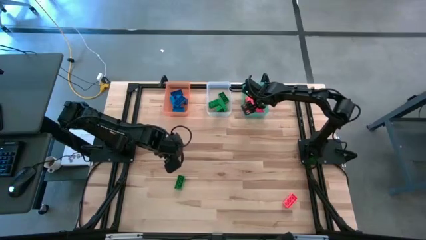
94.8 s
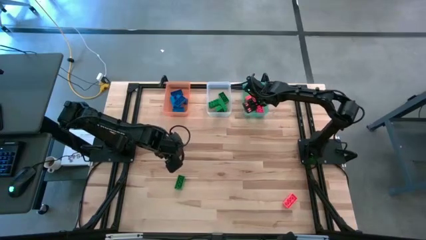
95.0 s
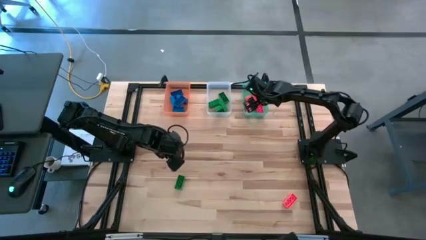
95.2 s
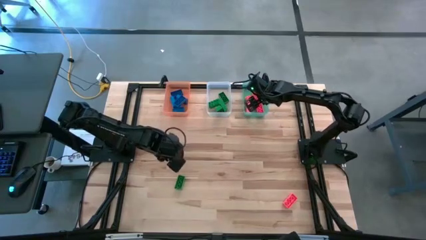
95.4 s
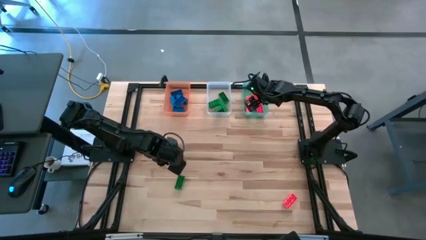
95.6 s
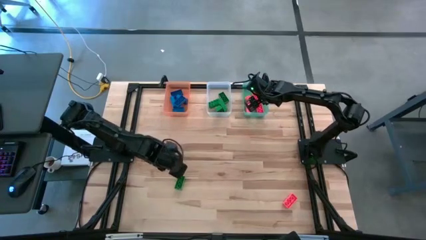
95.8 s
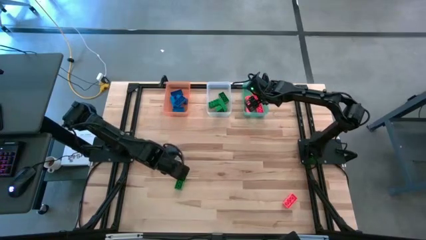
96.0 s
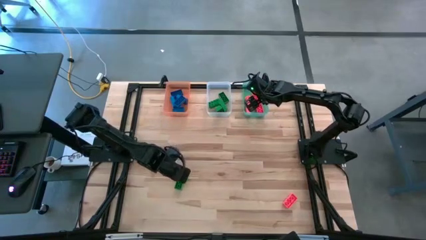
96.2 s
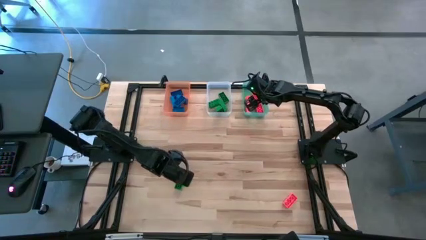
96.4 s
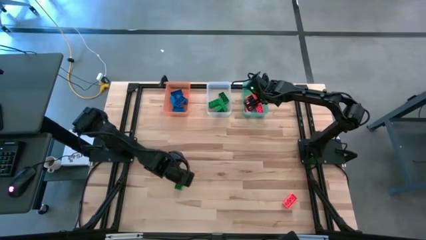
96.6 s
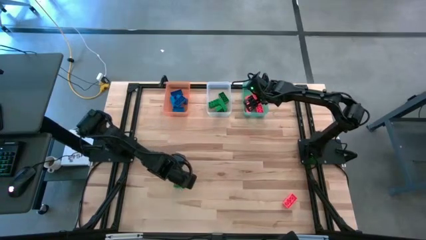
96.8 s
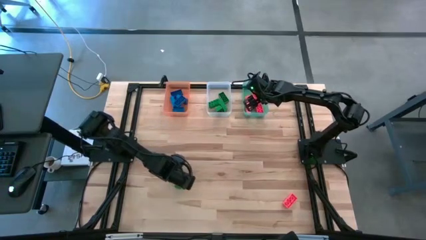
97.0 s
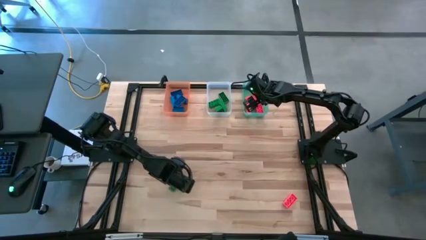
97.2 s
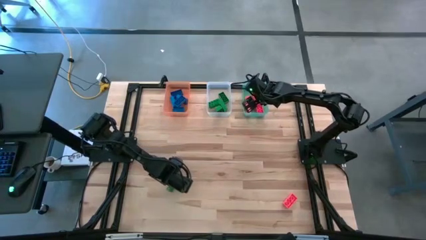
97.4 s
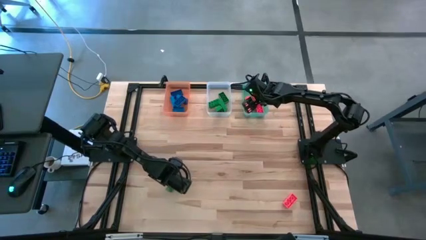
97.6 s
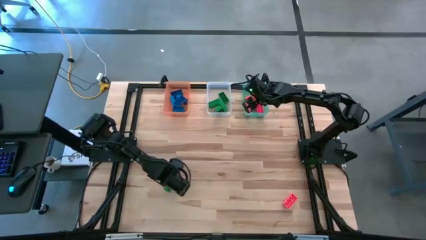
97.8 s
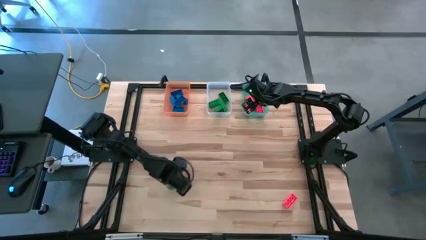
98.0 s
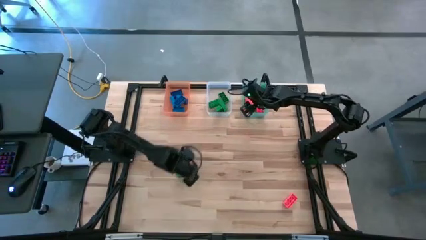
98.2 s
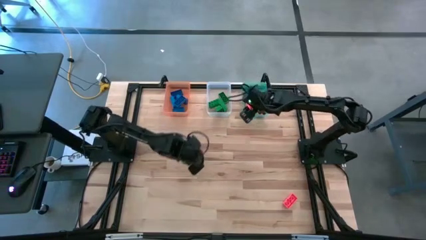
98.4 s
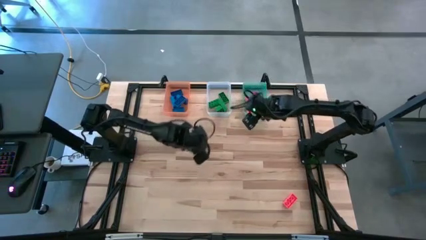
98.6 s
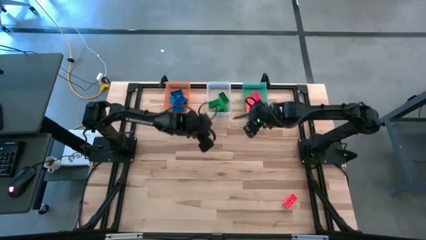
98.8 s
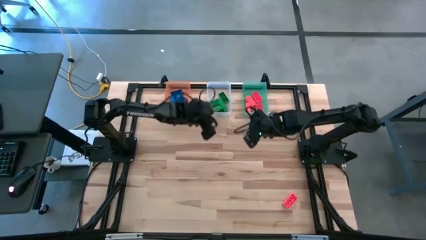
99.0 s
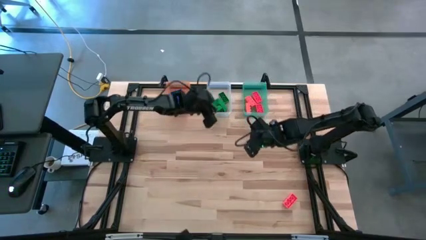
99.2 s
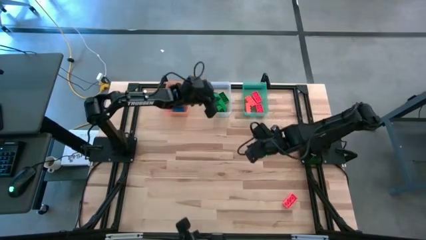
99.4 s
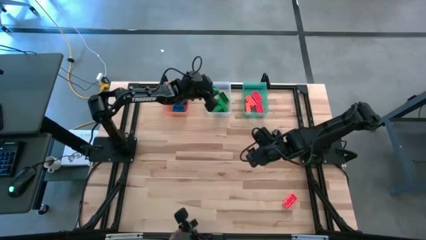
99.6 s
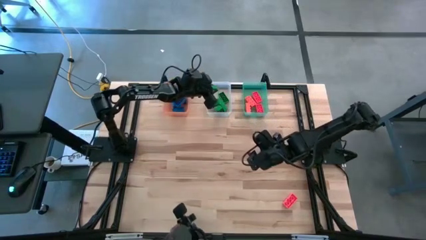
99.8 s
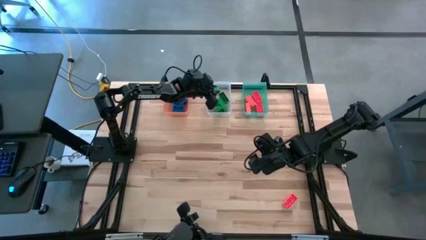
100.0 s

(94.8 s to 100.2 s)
Task: Sort & place blocks by color
Put the green game piece into the bin

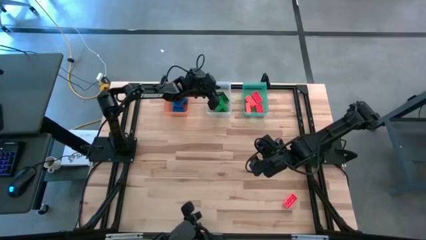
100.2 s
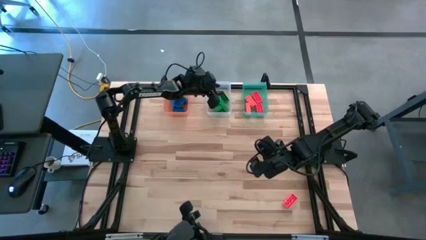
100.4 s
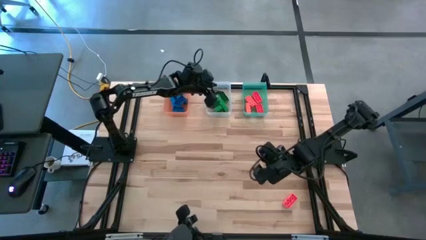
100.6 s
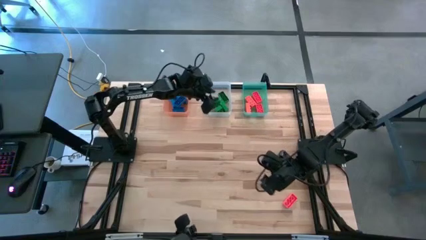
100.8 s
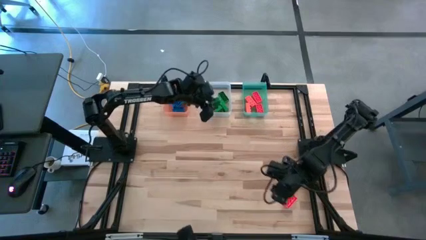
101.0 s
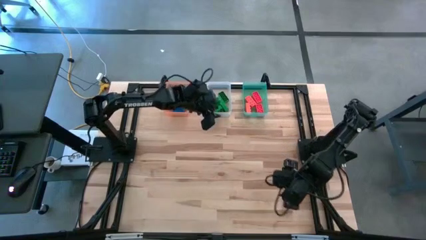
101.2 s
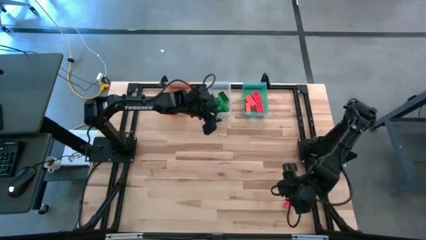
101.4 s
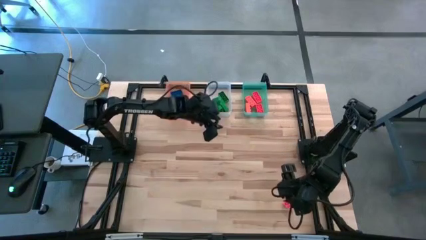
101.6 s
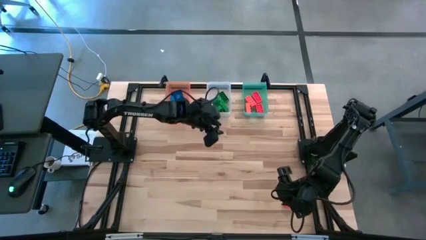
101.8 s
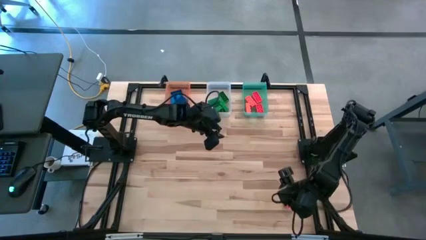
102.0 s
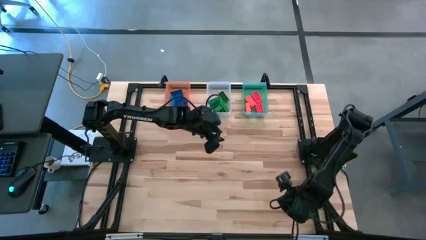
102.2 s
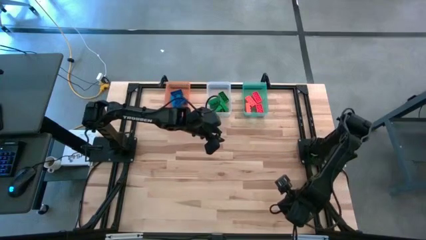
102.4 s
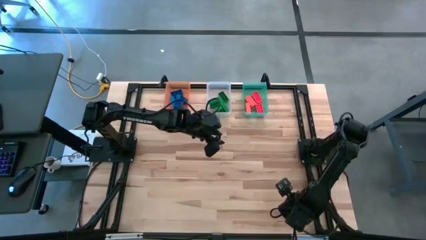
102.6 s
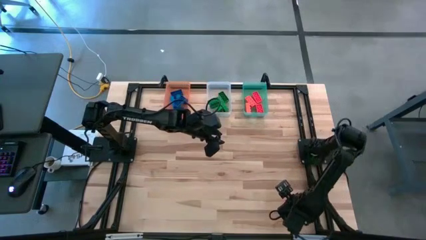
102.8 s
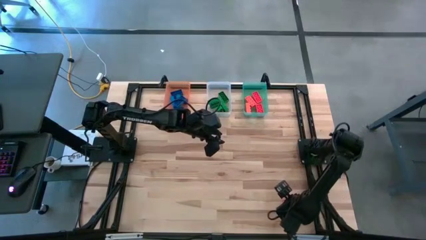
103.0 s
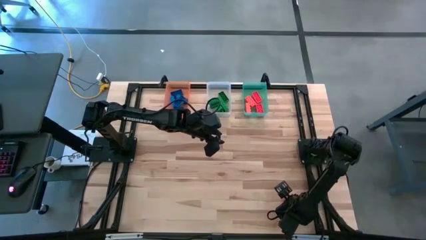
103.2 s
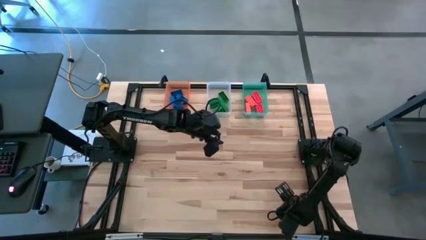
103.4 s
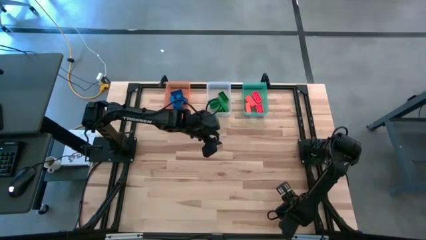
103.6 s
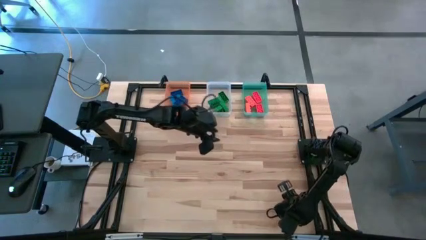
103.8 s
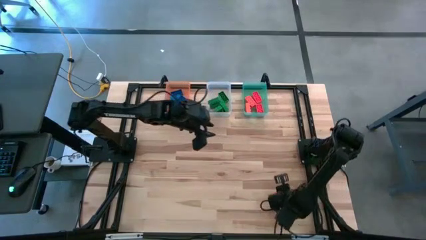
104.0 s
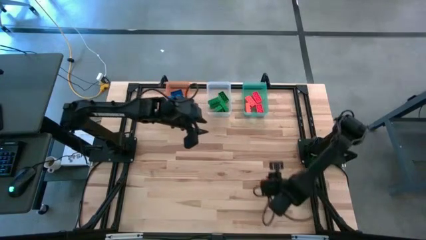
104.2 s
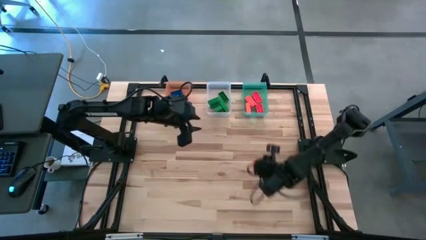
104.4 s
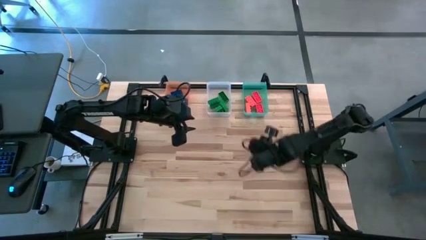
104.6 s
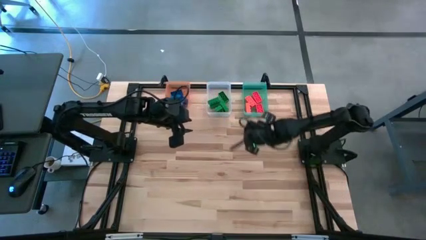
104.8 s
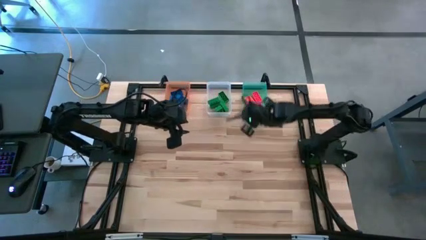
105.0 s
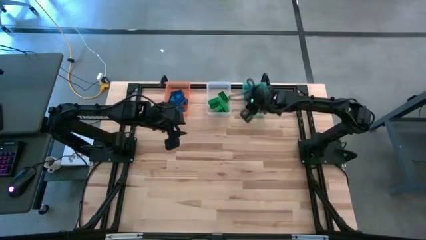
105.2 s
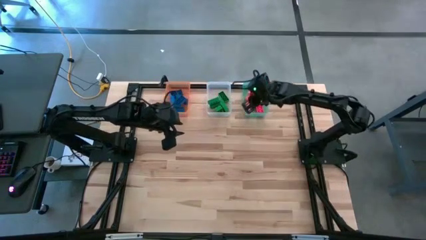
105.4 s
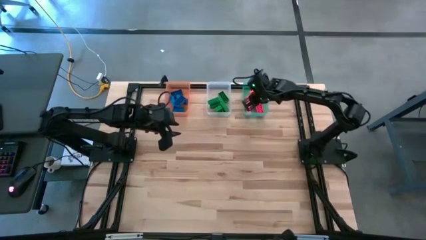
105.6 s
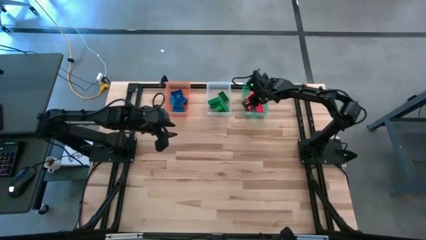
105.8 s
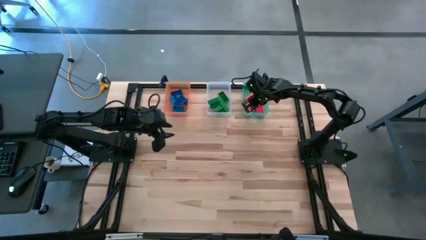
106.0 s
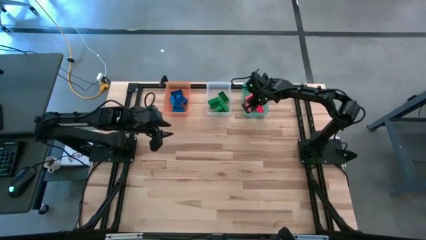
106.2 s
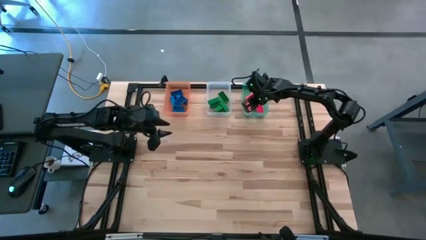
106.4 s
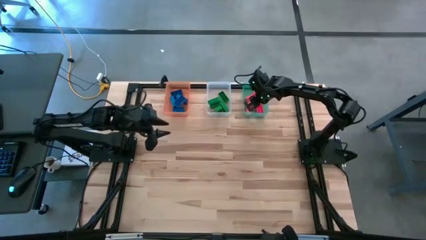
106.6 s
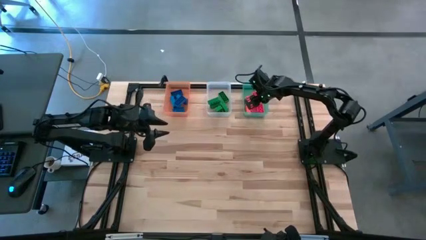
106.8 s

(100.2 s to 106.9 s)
Put the orange game piece into the bin

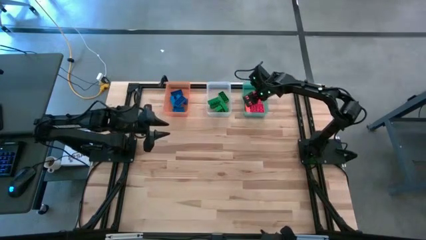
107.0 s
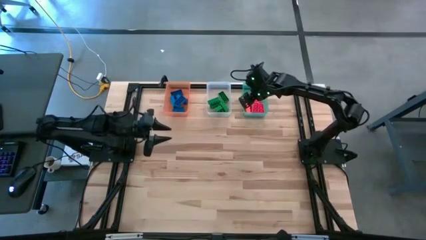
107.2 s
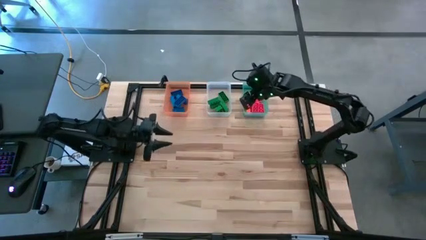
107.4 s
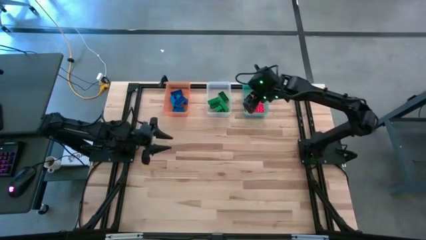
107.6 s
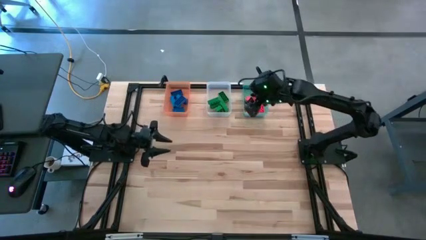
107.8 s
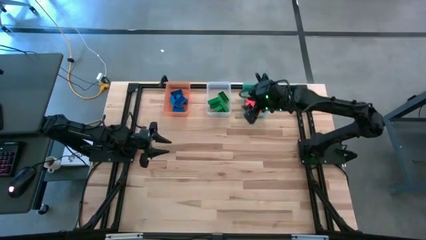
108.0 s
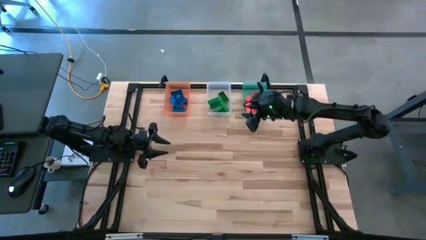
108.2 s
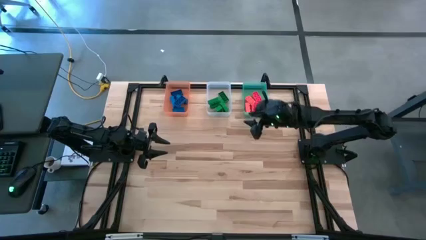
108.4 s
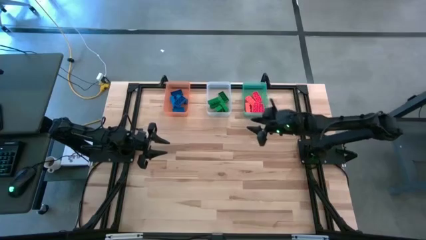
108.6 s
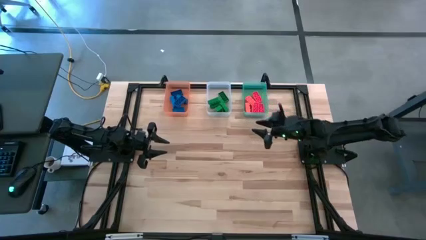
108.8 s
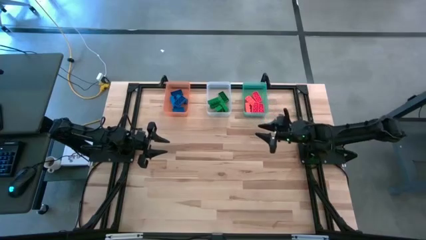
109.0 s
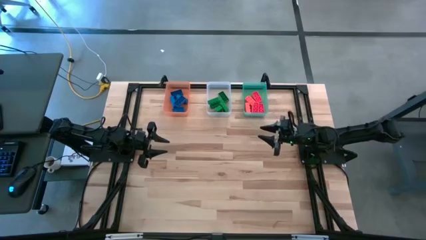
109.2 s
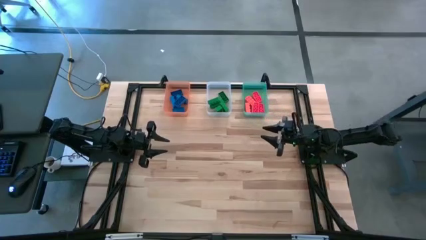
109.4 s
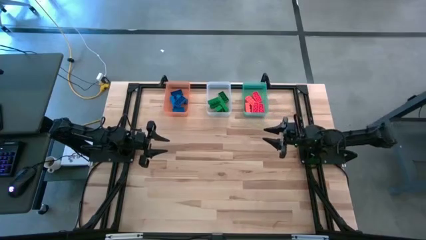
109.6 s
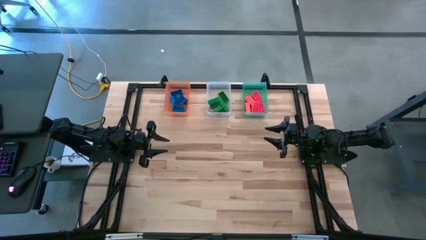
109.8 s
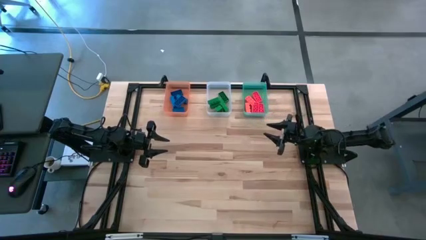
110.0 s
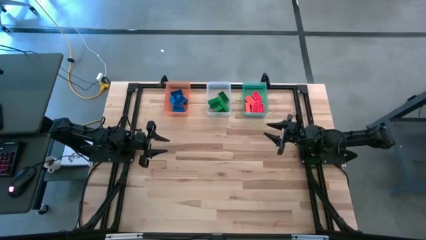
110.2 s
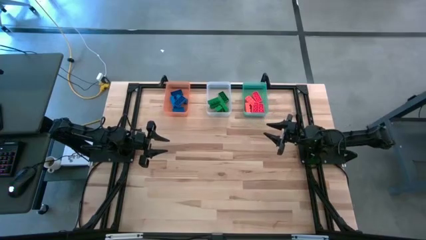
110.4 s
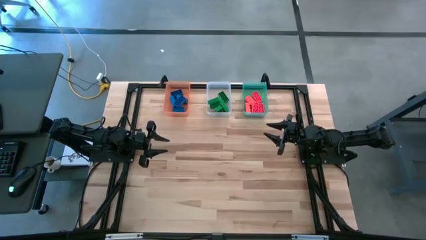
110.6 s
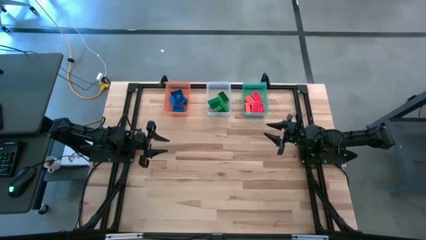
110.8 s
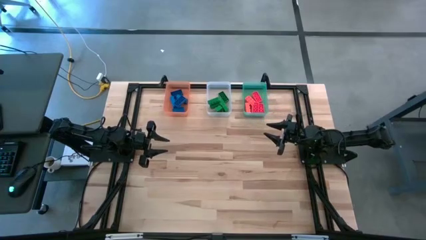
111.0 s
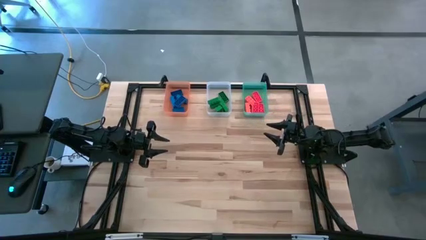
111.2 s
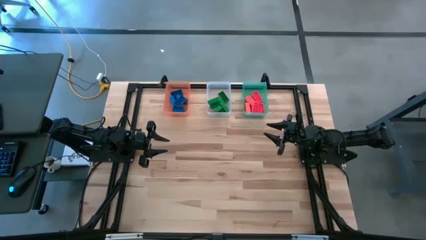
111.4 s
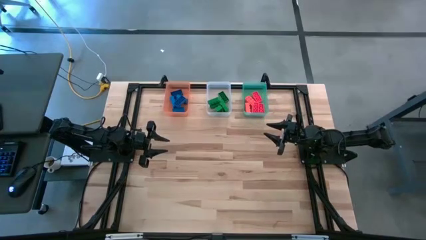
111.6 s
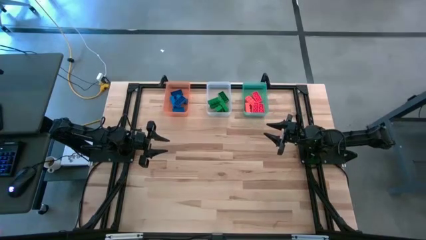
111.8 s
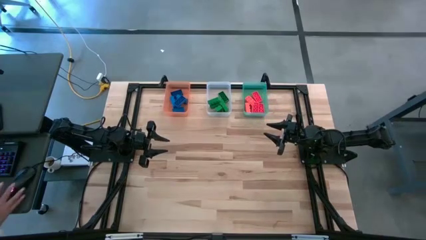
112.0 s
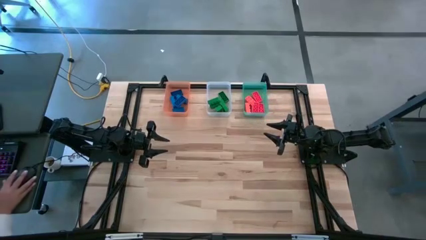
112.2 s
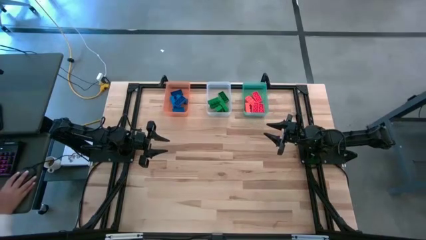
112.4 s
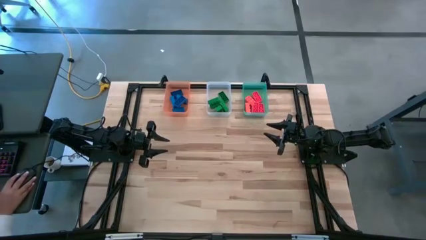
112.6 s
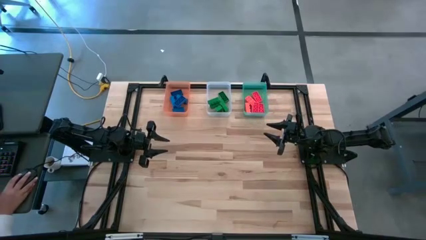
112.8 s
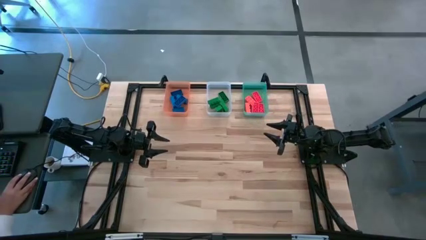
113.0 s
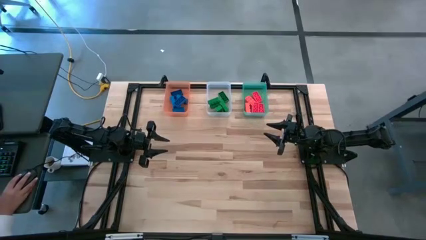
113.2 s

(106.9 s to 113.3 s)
Return to Home Position
